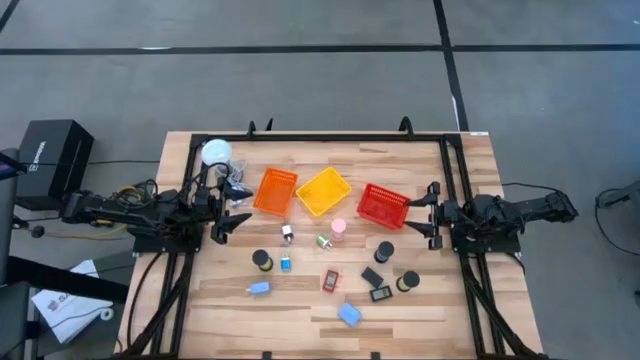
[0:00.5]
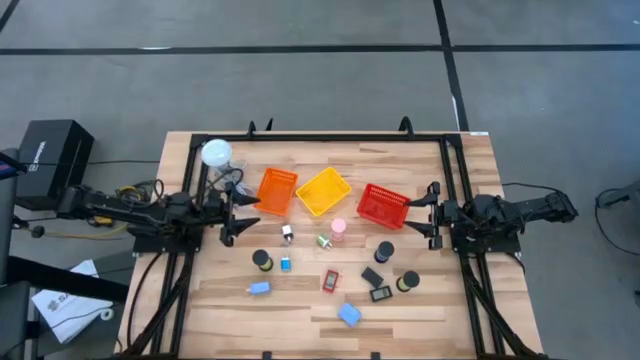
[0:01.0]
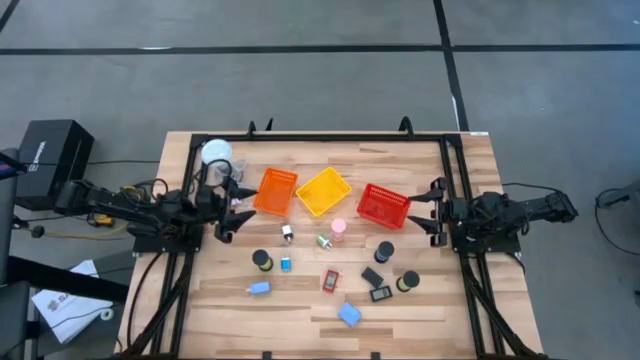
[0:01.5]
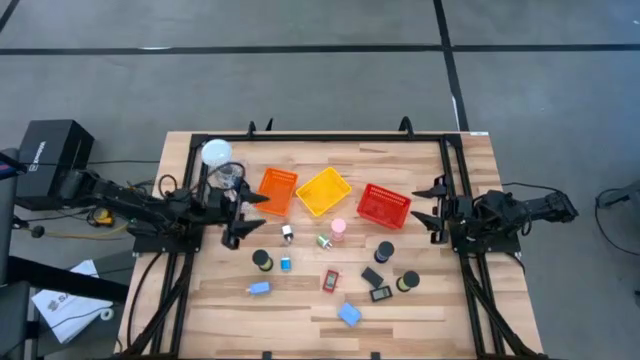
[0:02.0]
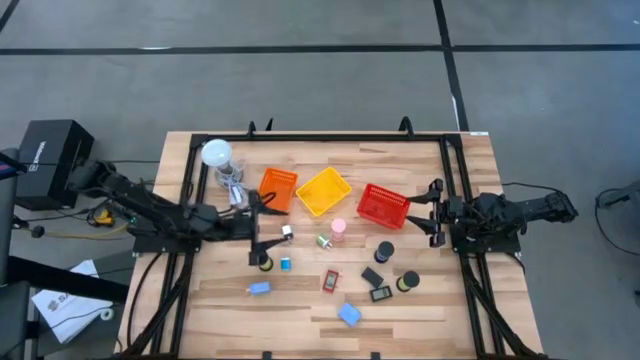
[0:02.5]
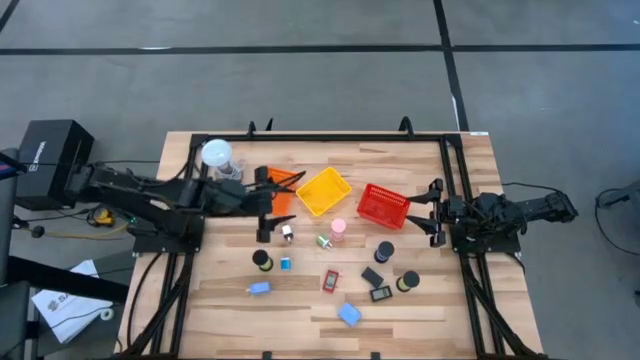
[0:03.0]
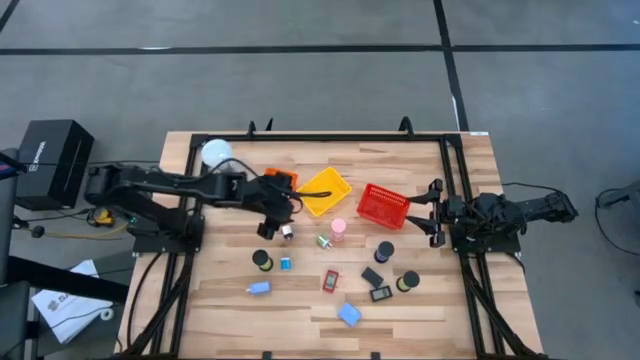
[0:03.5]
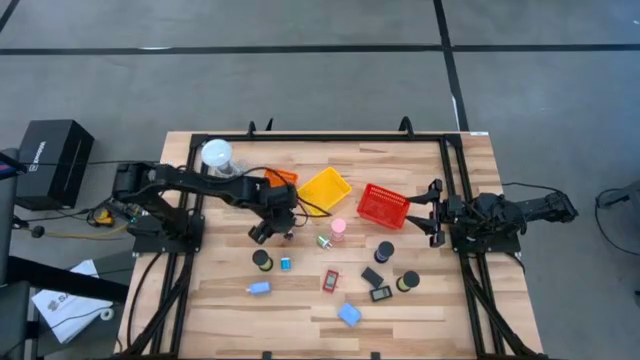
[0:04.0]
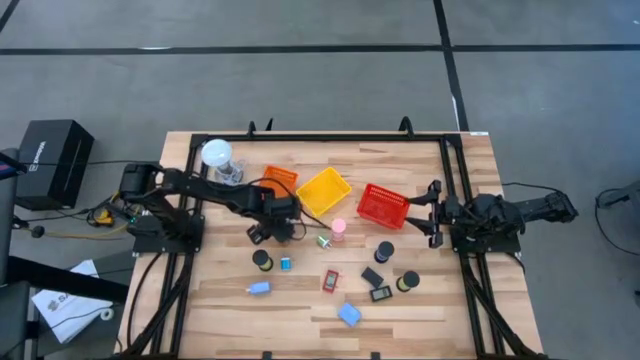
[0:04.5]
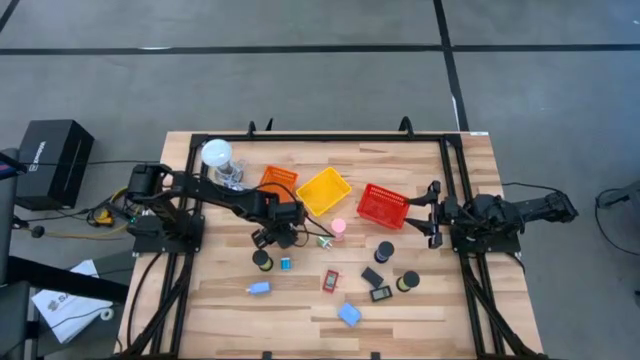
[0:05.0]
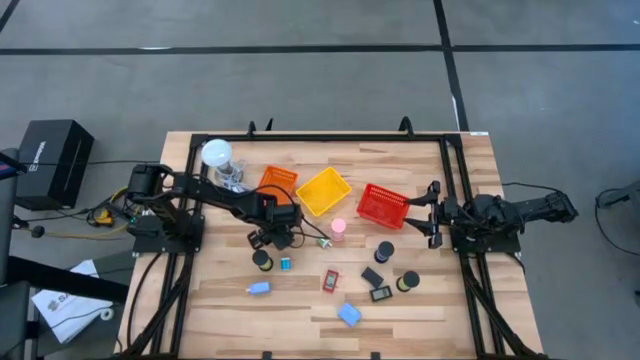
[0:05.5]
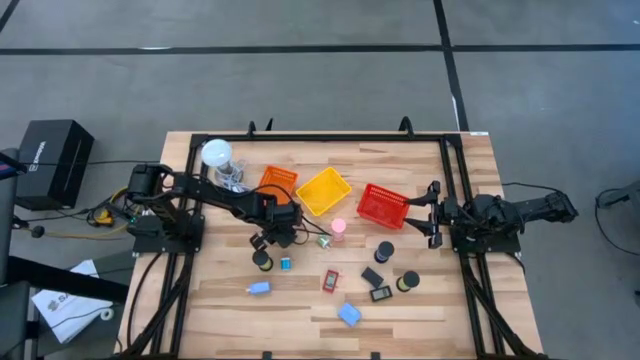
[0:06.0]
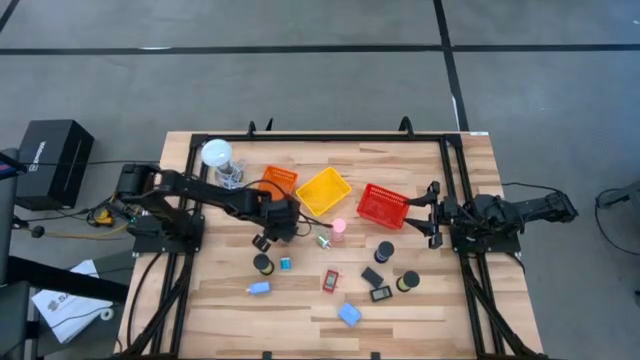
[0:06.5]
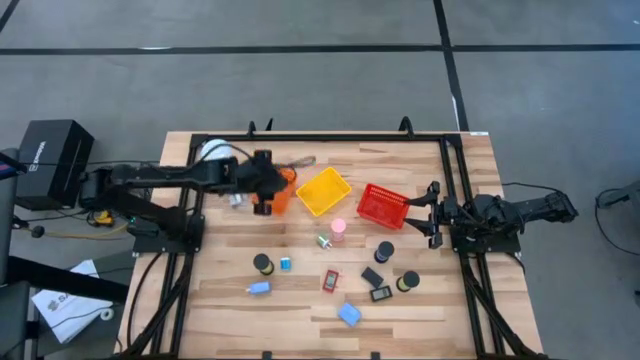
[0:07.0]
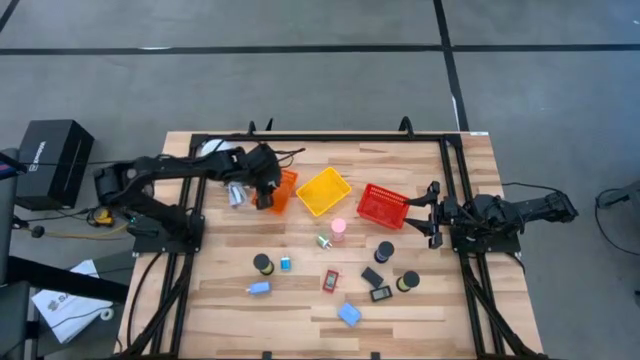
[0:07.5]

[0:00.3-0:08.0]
Task: Pick & Place Office items
Put the white charger adapter into the orange bin

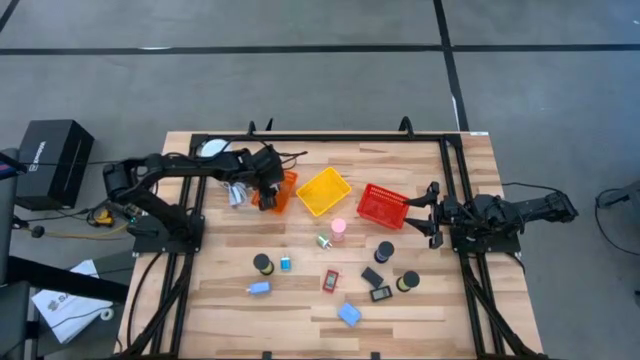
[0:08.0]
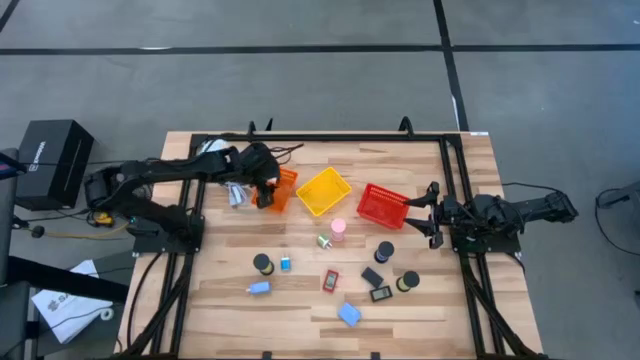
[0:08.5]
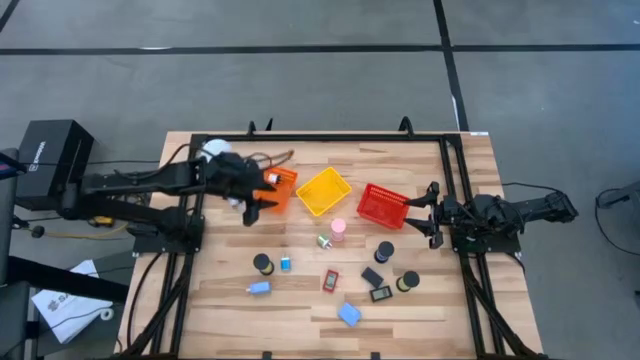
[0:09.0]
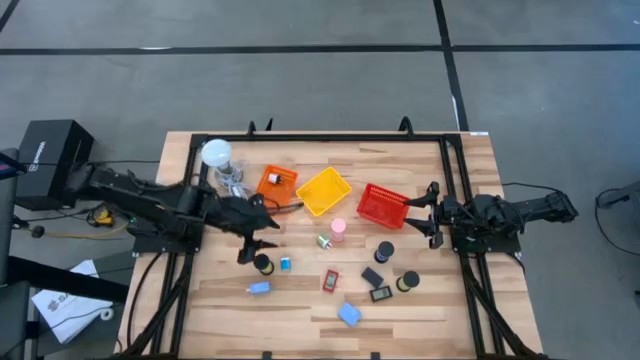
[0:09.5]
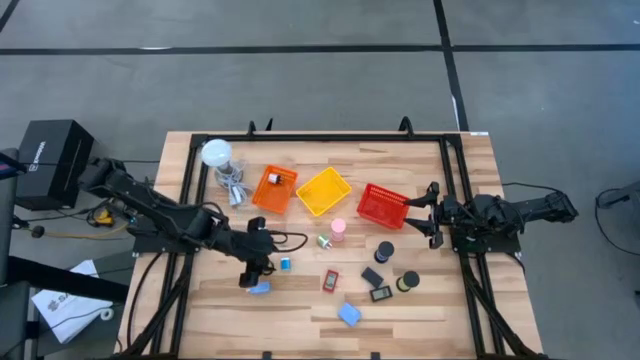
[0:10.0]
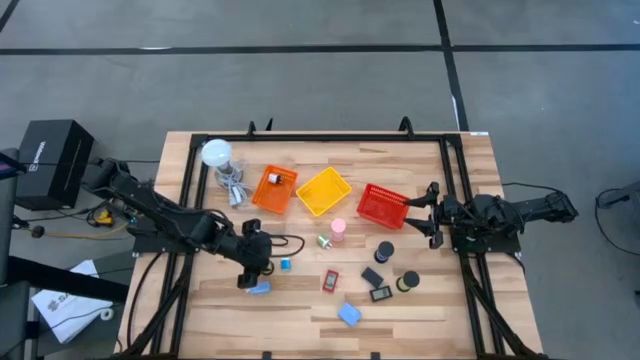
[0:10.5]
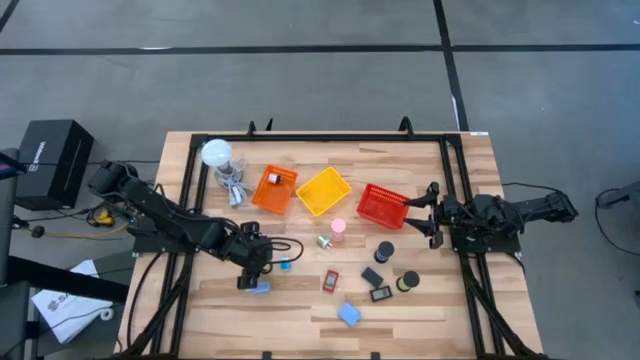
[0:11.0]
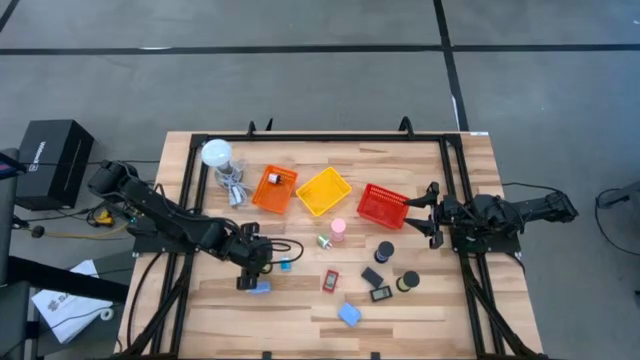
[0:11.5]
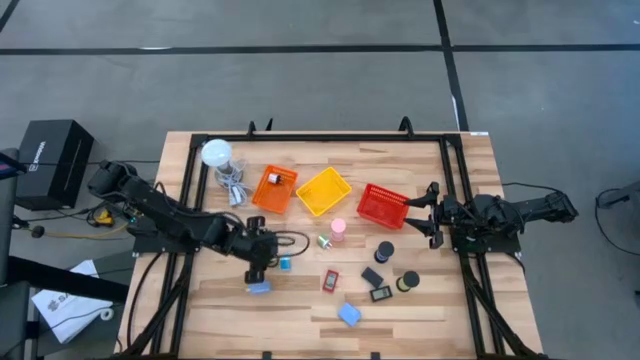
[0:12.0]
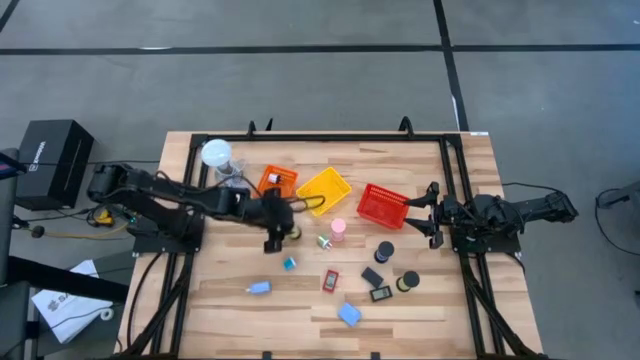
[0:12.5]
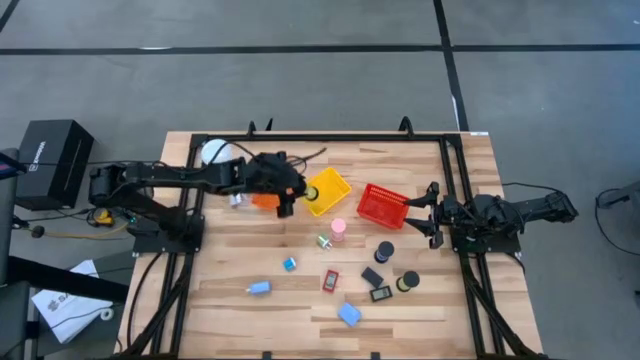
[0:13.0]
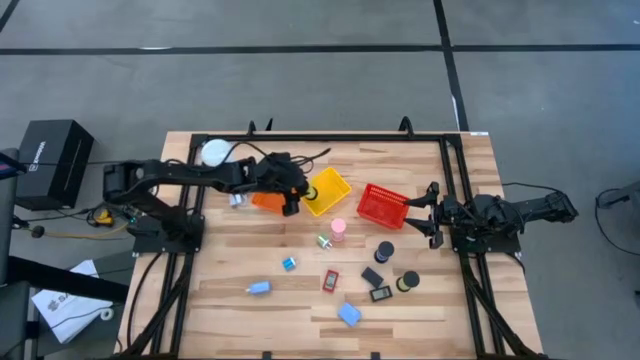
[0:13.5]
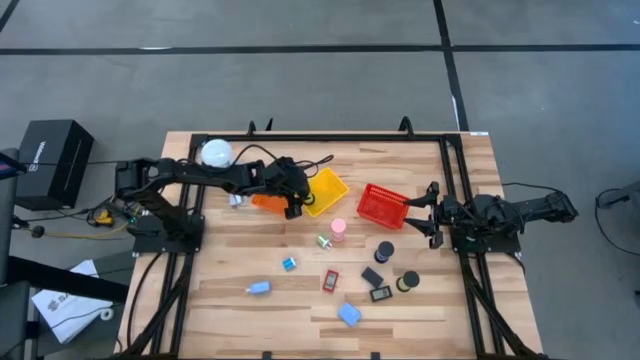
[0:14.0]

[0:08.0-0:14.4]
Put the left green hourglass in the yellow bin

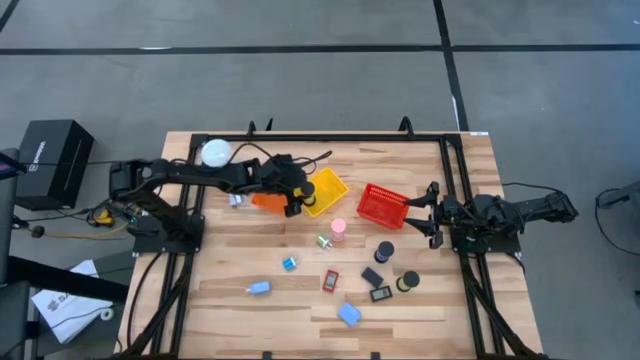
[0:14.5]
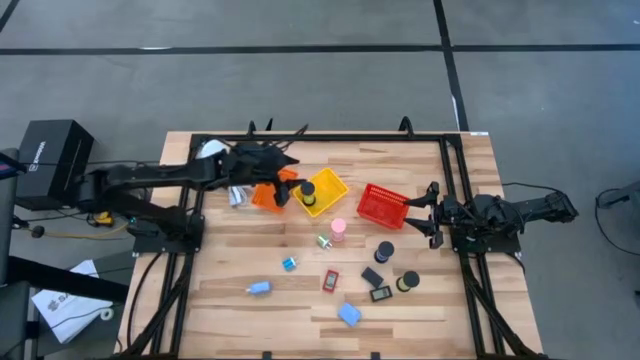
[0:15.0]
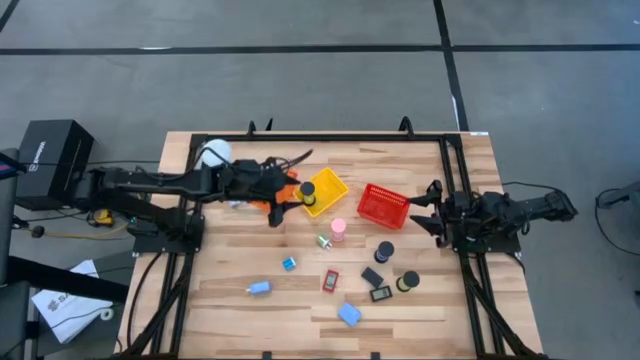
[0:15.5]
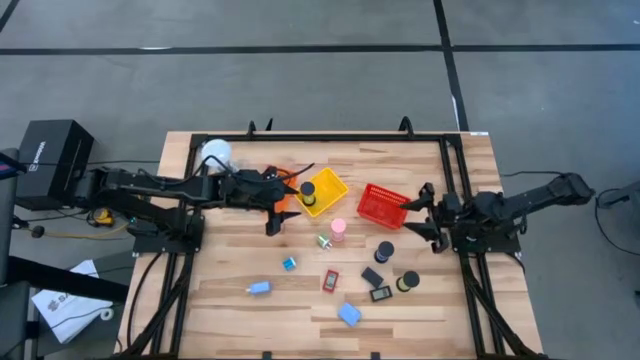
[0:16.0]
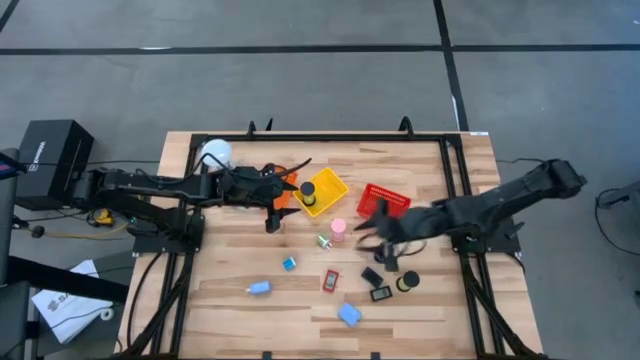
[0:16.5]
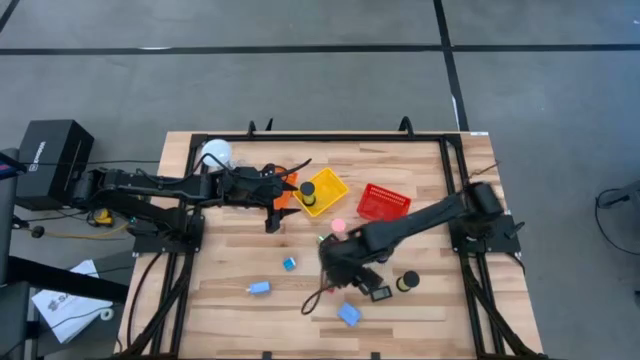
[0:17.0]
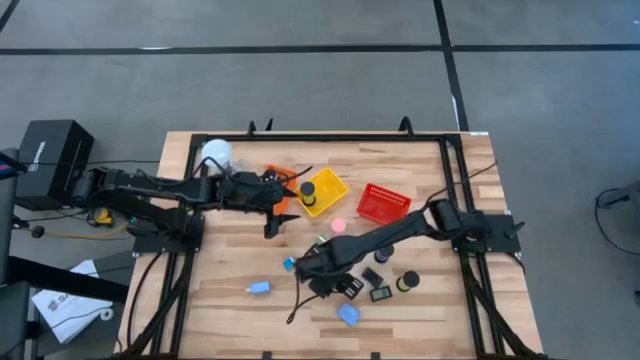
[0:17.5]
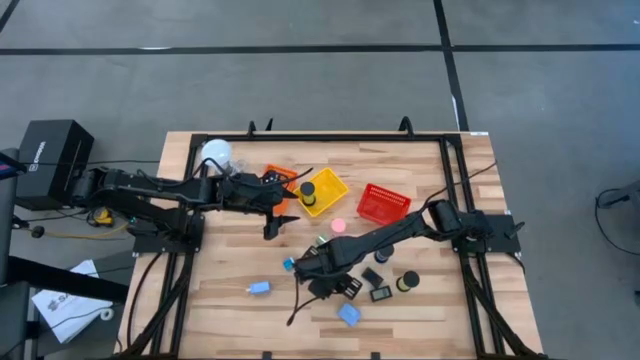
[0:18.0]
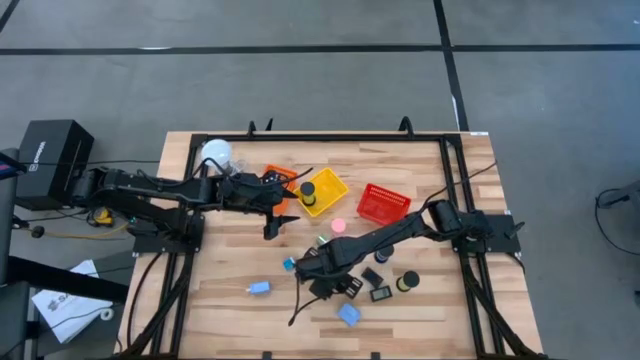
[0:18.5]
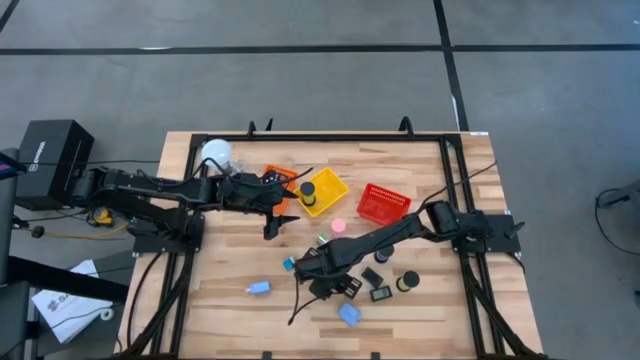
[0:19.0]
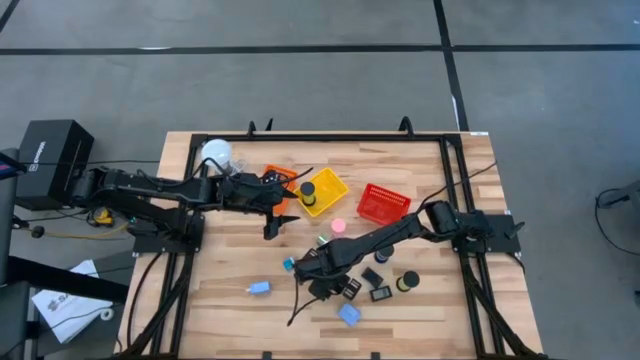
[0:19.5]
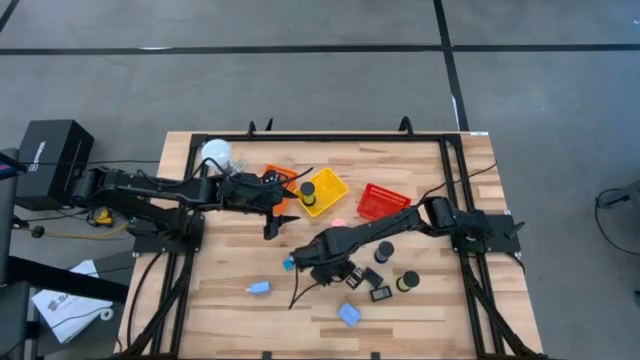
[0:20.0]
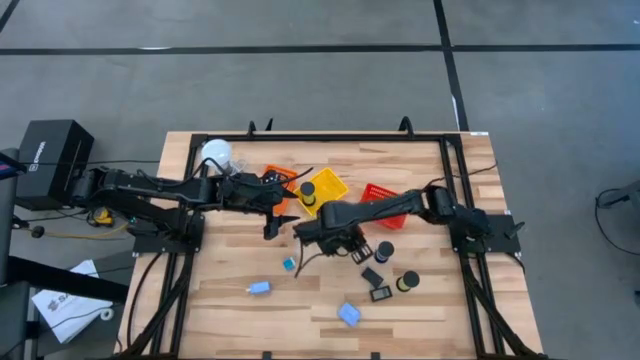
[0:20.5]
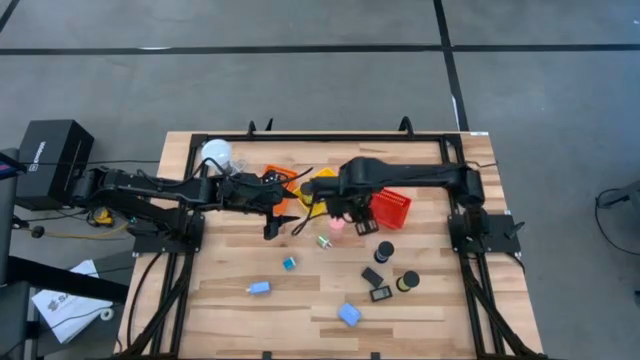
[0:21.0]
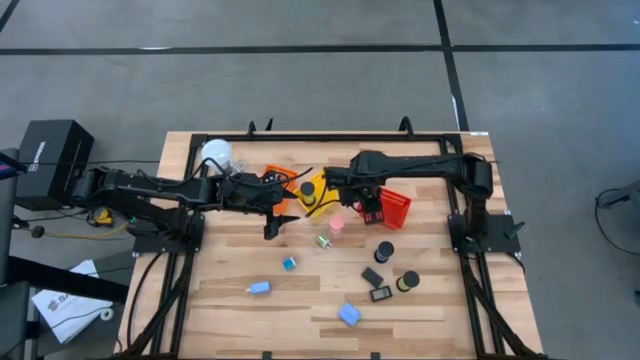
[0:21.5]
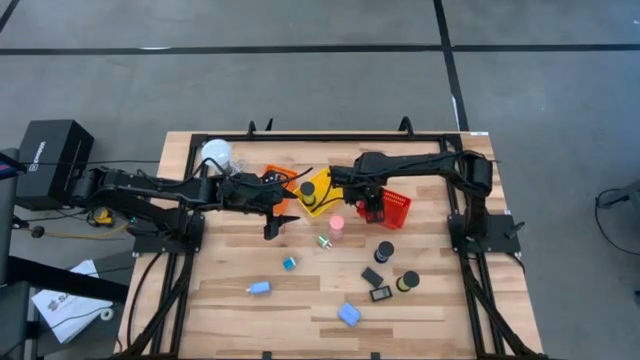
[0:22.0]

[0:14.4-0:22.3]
Put the red timer in the red bin
